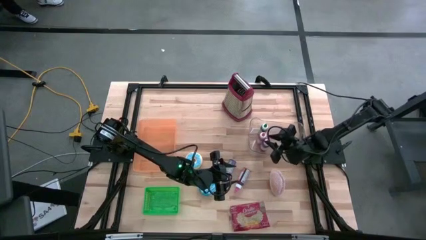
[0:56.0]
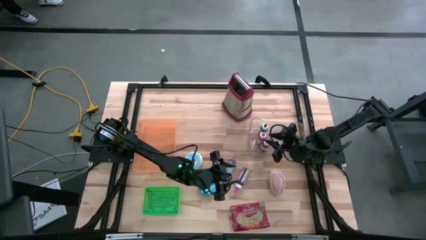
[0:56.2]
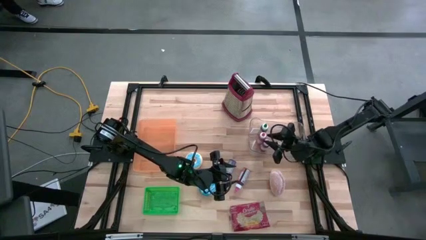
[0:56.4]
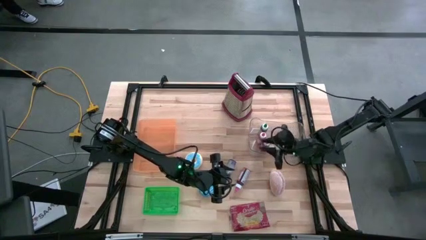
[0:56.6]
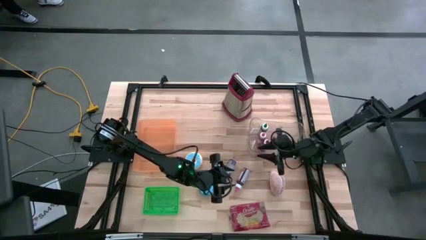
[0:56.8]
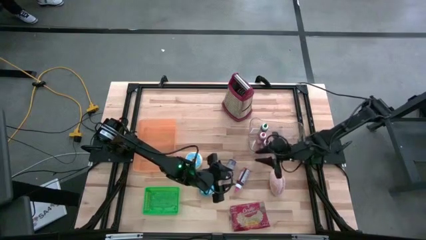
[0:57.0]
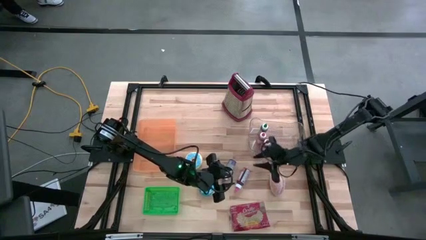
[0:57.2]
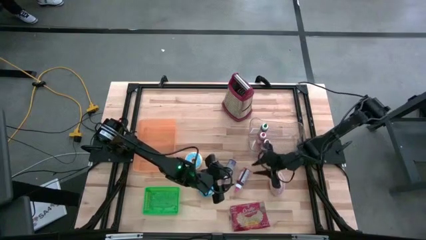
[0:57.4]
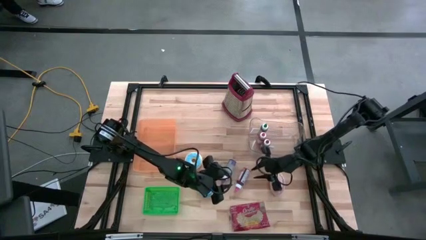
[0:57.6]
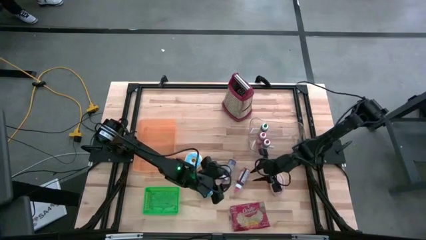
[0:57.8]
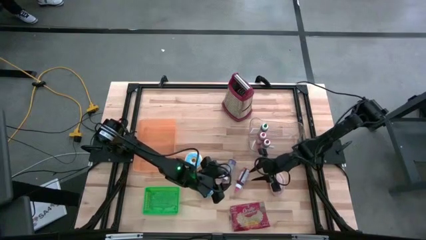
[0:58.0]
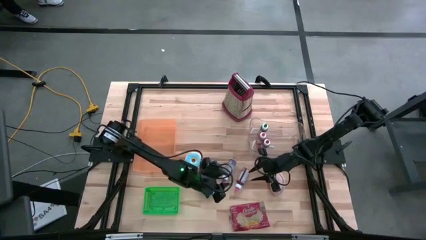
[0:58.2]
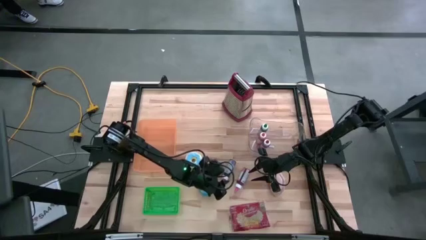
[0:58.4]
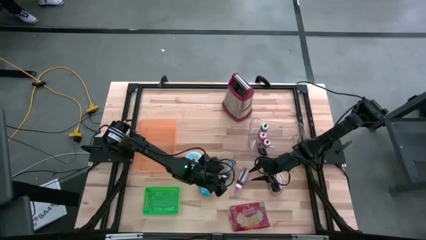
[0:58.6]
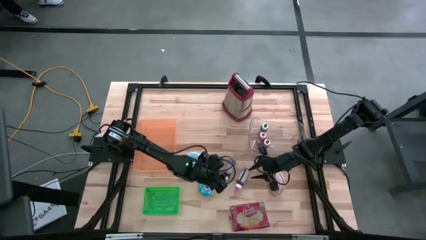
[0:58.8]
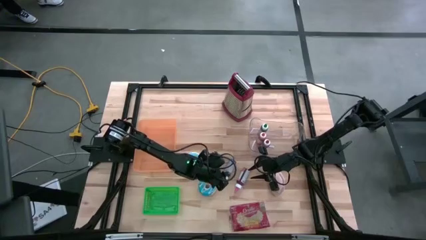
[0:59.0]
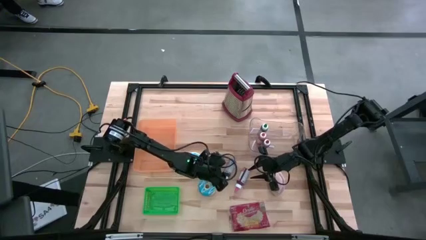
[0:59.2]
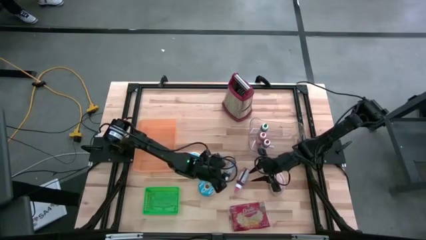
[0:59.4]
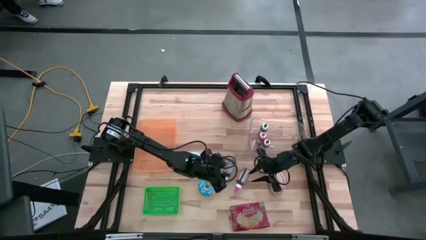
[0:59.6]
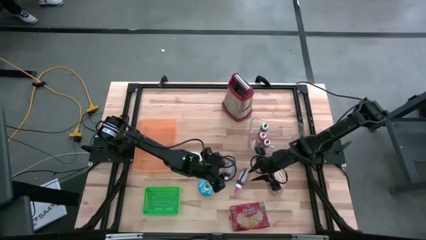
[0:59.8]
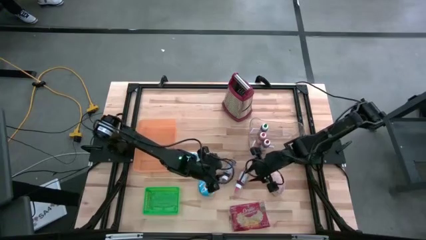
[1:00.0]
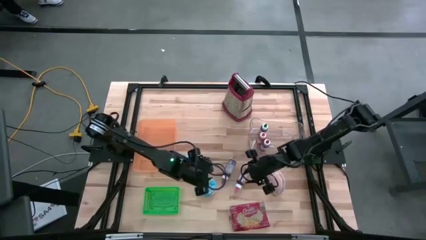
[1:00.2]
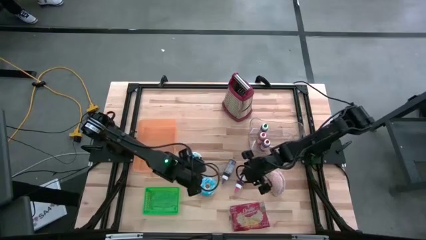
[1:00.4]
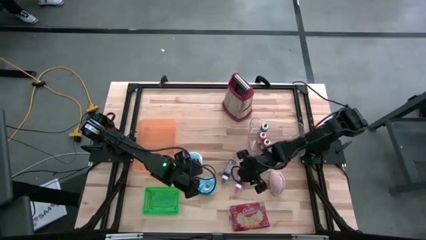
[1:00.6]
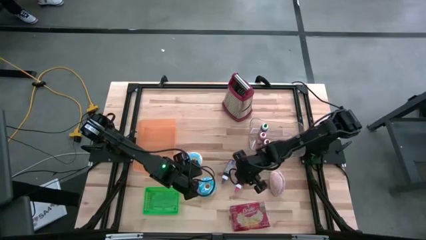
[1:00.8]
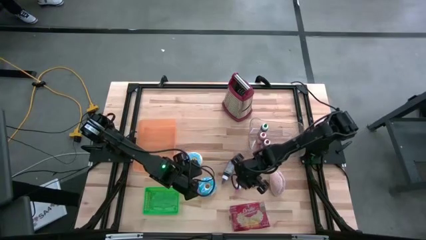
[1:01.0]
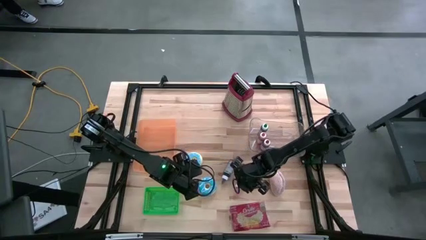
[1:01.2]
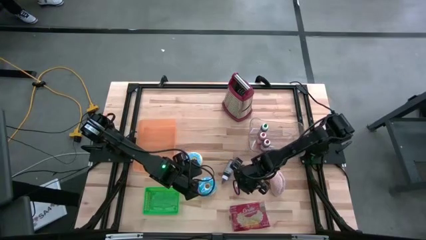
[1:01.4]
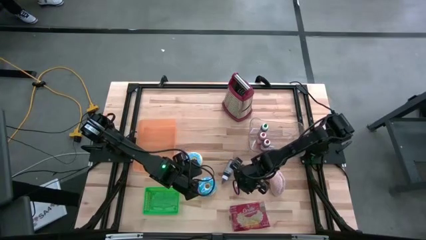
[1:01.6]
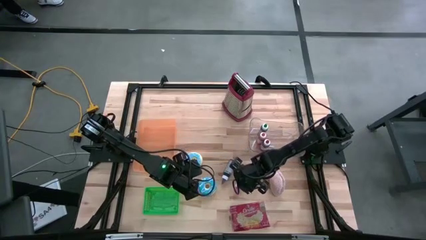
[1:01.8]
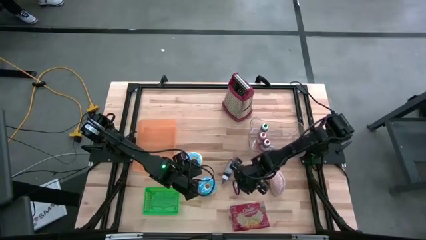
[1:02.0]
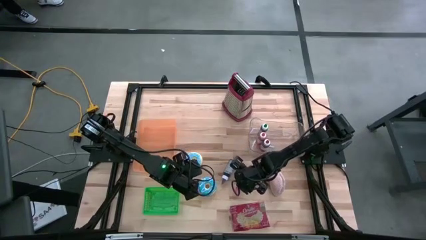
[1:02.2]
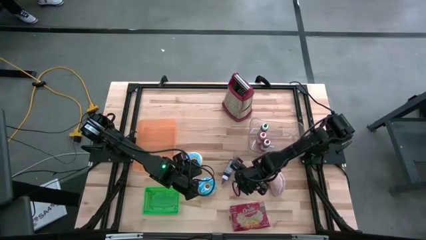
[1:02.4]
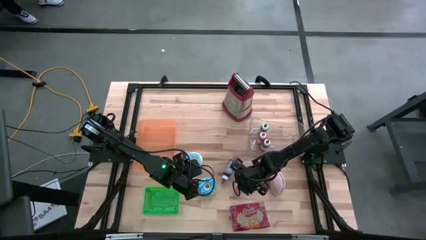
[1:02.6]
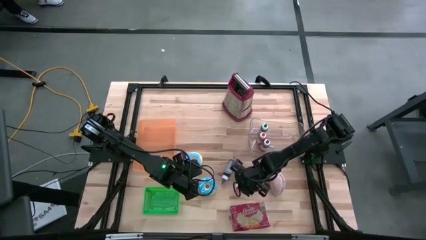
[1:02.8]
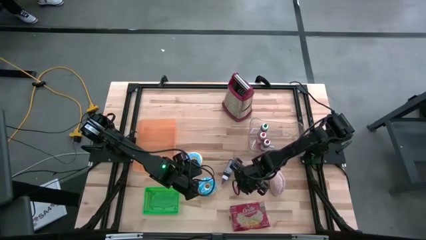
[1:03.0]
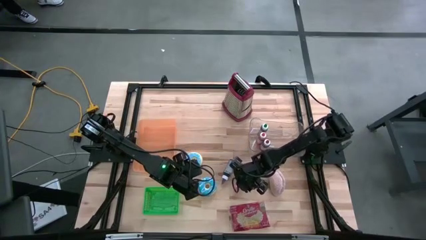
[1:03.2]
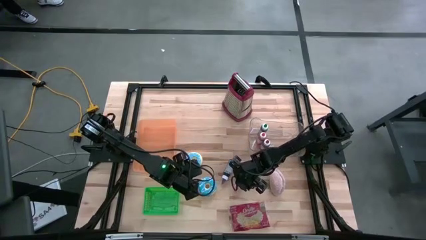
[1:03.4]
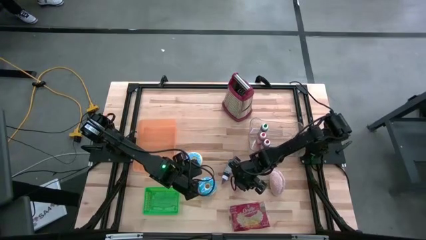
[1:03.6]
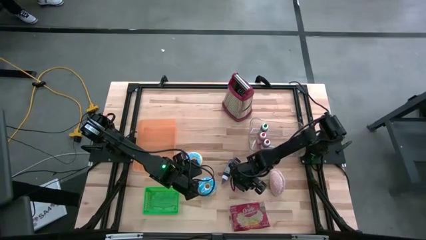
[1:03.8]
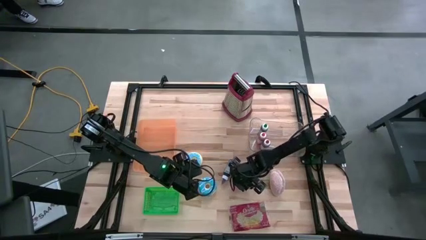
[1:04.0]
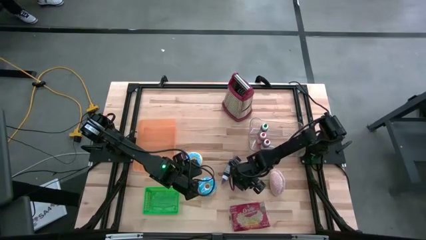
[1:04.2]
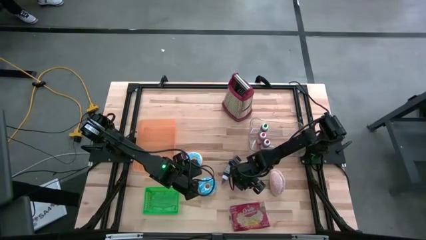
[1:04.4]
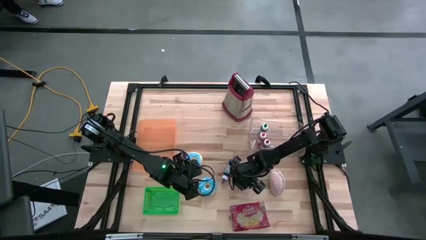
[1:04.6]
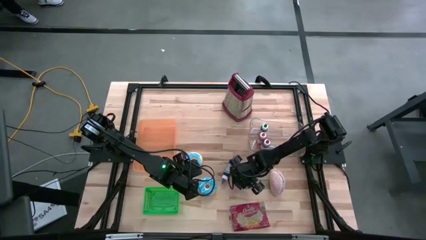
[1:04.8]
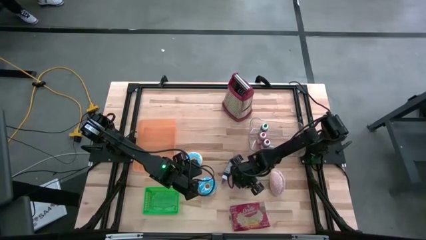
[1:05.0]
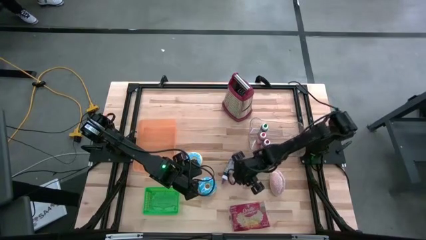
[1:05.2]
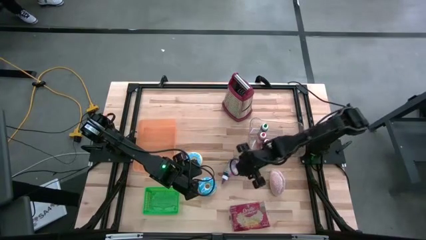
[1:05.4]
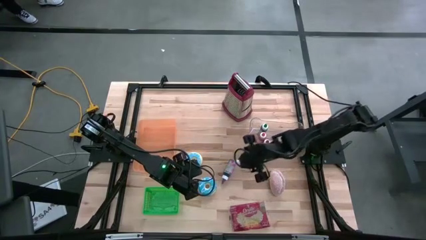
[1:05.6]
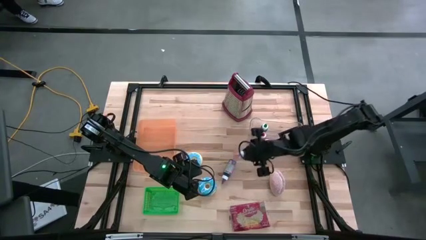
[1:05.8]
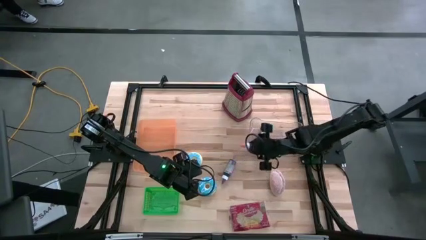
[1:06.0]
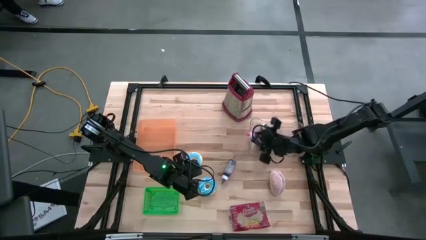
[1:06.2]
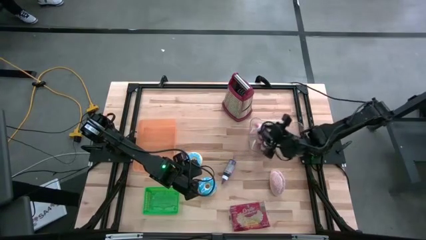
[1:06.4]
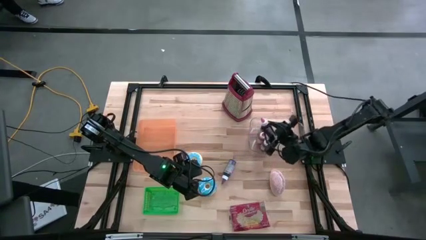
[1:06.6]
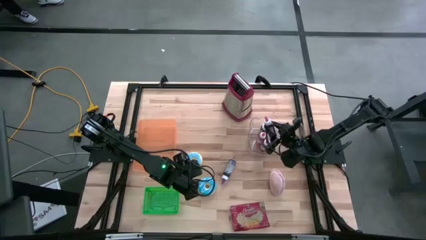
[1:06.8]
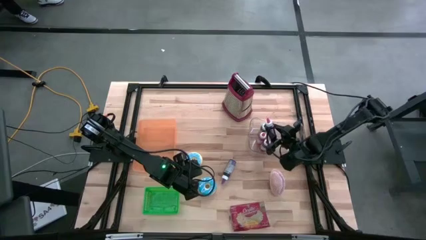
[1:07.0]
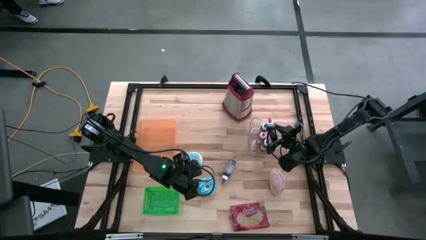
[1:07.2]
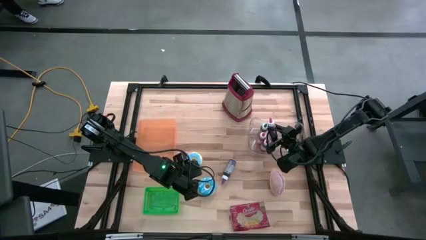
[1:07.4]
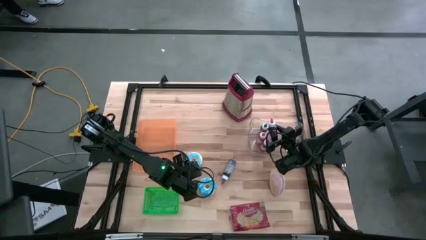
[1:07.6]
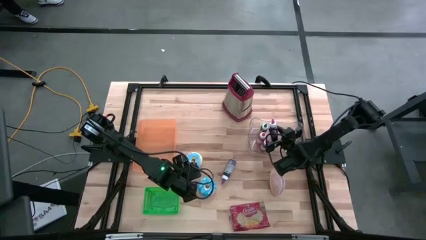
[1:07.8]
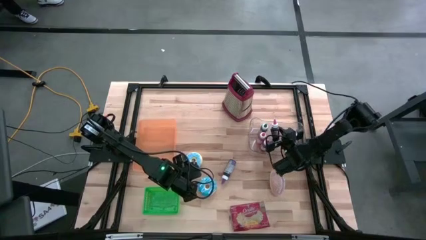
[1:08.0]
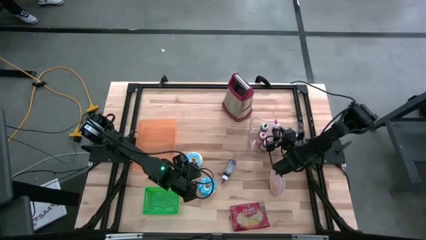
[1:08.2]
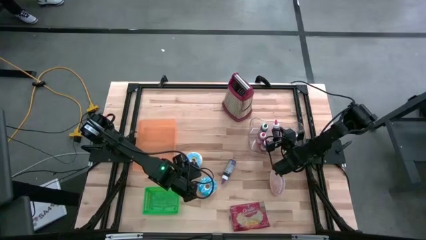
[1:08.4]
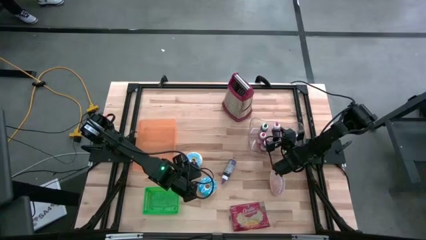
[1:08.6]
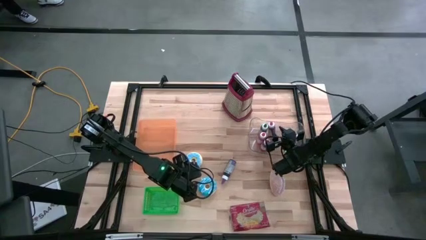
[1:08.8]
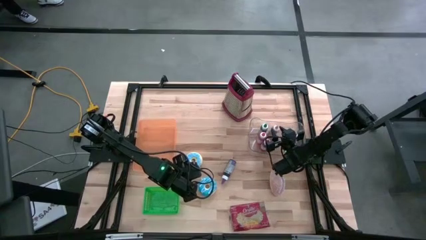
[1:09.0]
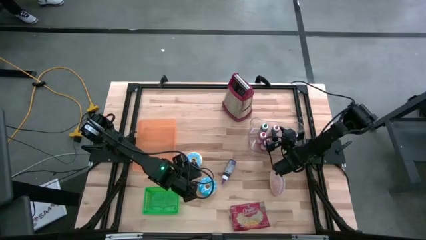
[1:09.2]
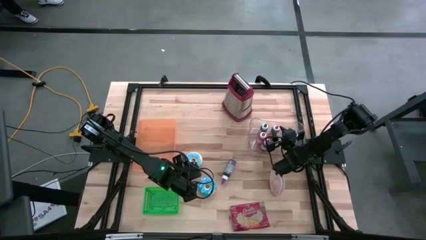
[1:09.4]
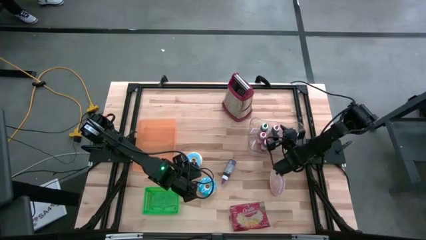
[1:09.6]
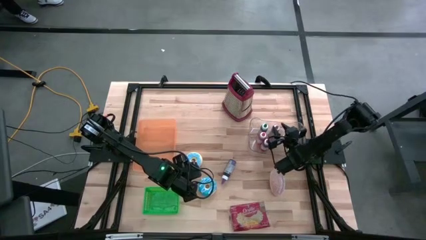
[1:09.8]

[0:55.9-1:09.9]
Put the pink food coloring into the transparent bin
